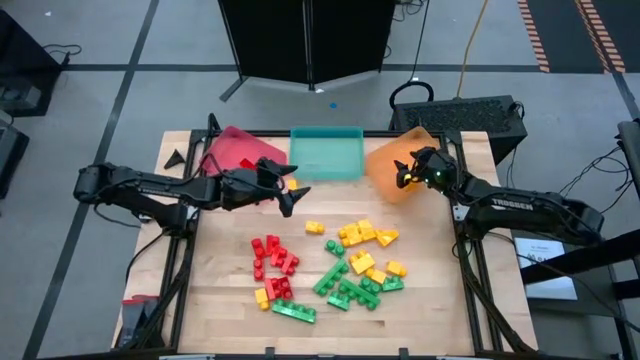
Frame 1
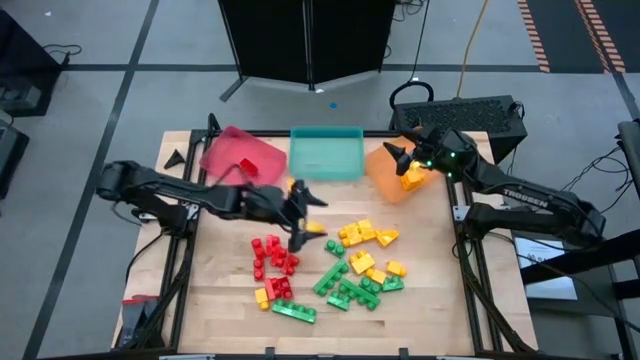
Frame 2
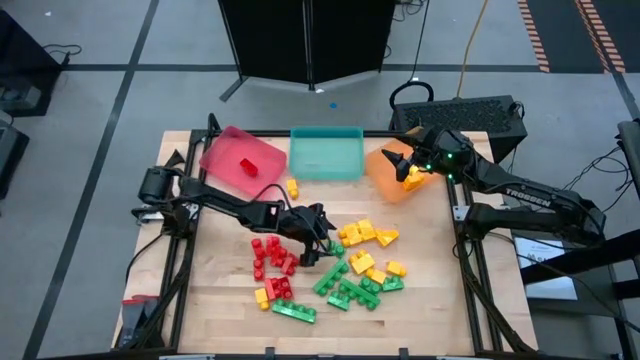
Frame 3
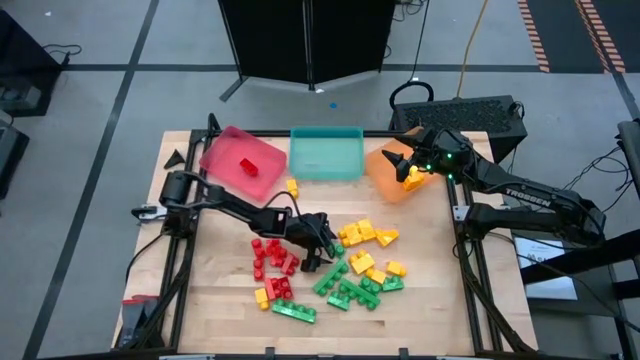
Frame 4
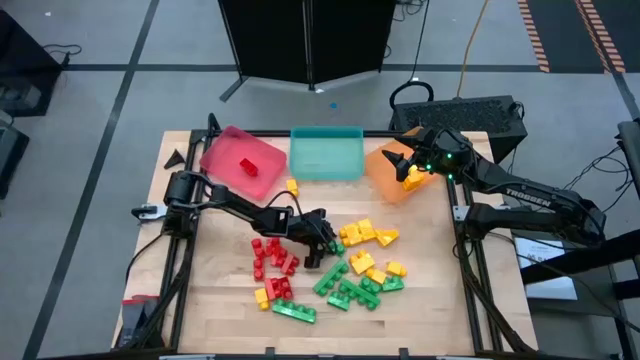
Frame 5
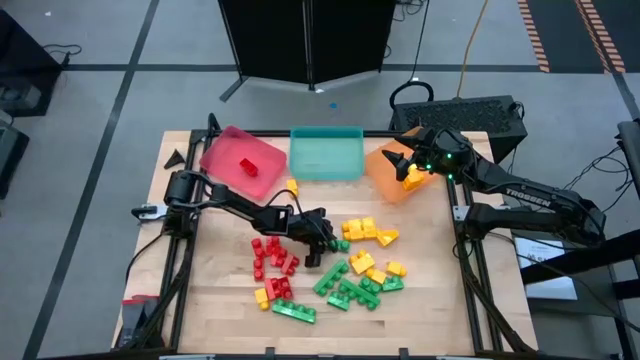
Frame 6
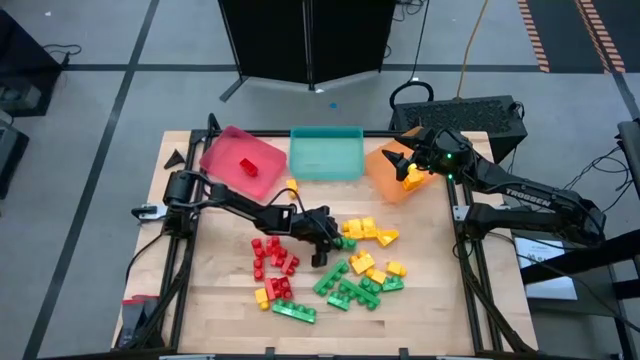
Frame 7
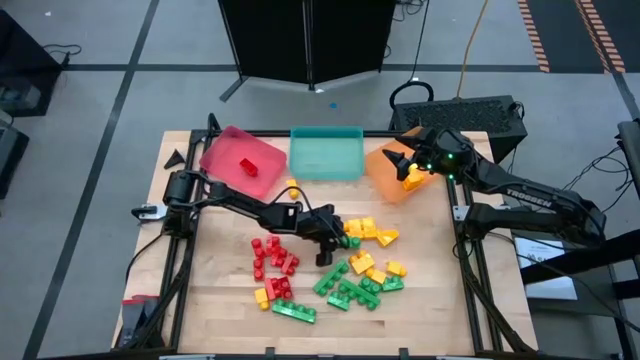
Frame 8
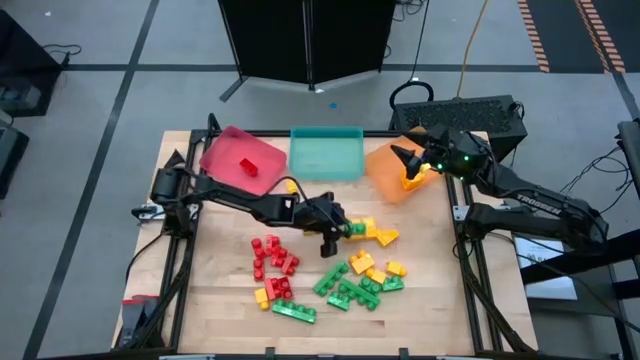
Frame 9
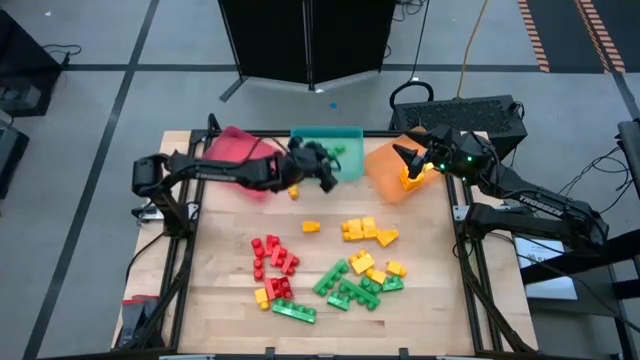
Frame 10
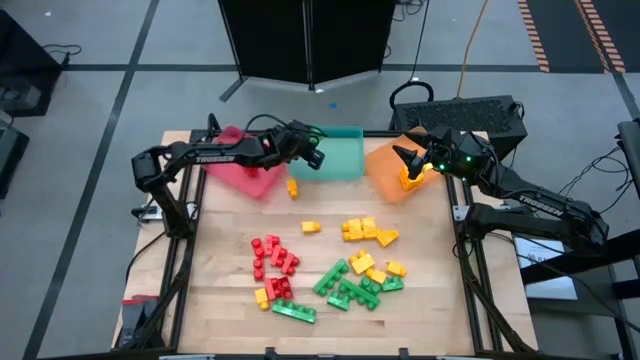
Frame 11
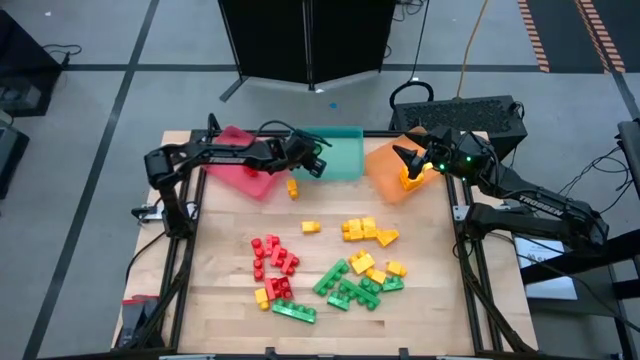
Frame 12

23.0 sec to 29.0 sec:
Task: Sort blocks
Put the green game piece into the blue bin

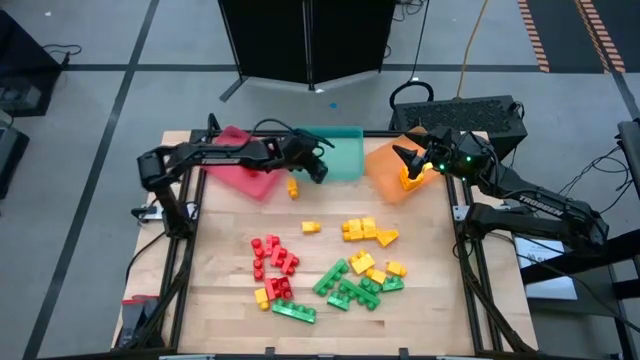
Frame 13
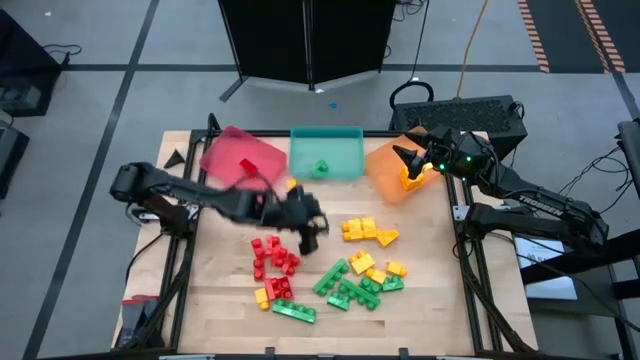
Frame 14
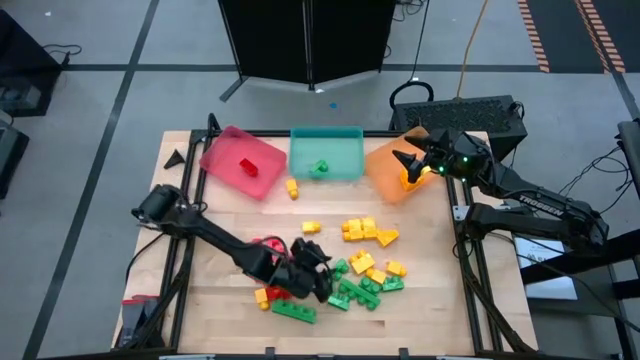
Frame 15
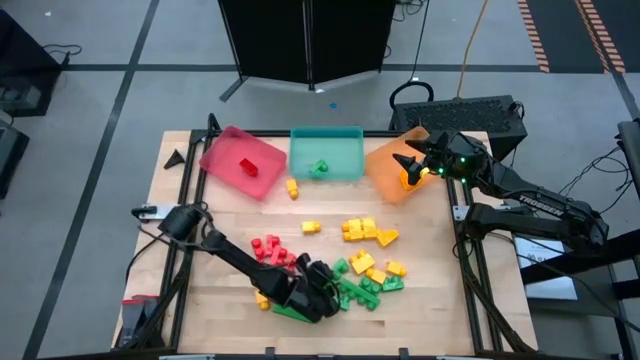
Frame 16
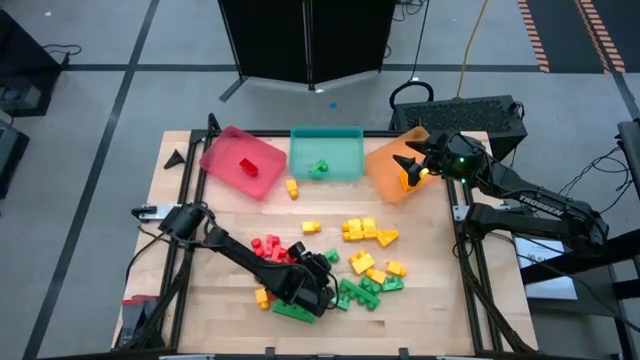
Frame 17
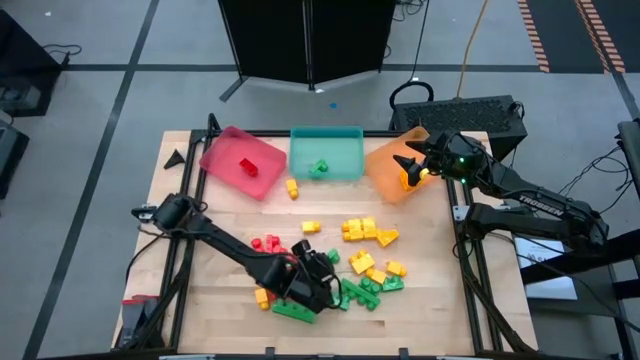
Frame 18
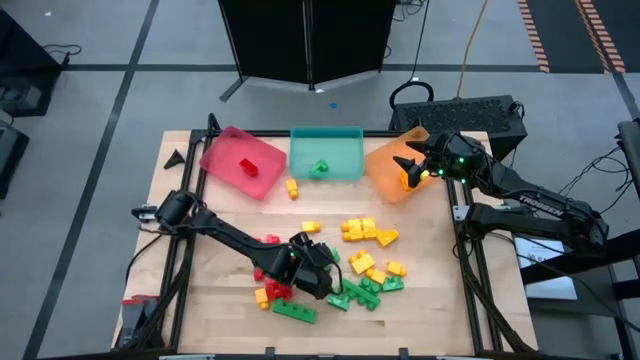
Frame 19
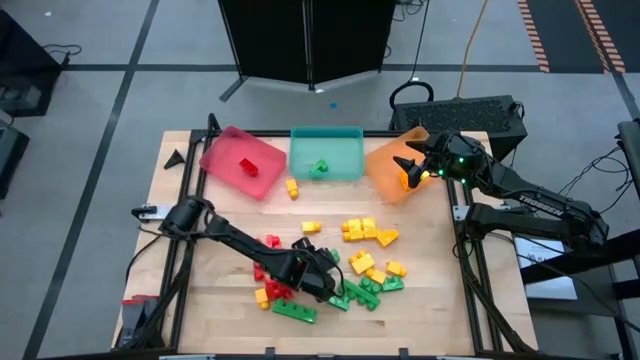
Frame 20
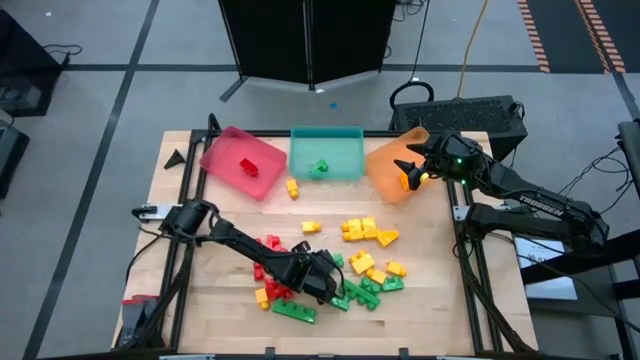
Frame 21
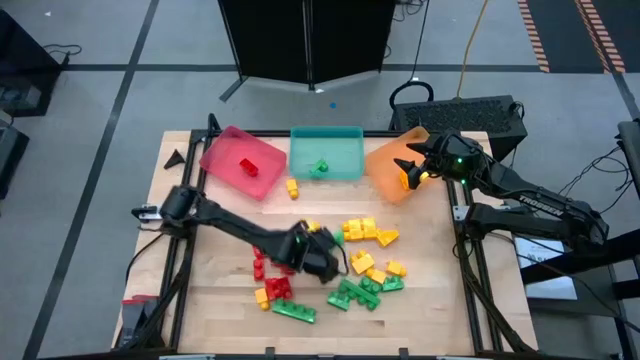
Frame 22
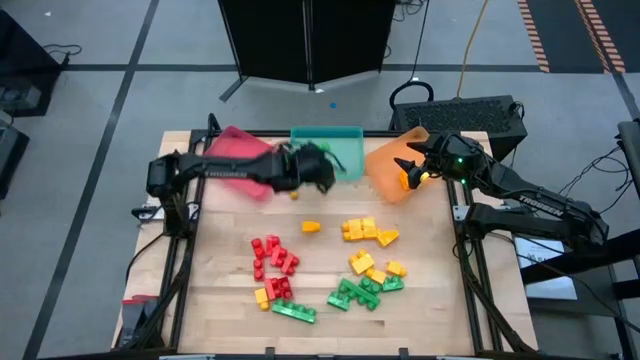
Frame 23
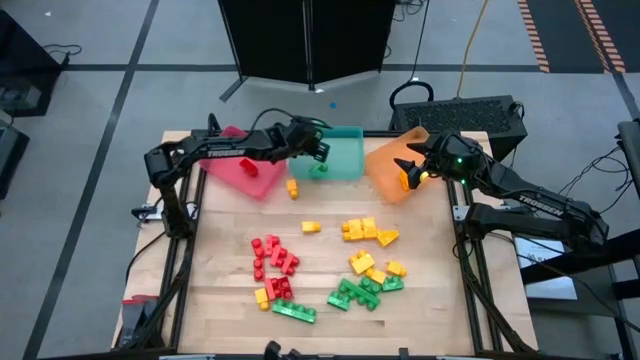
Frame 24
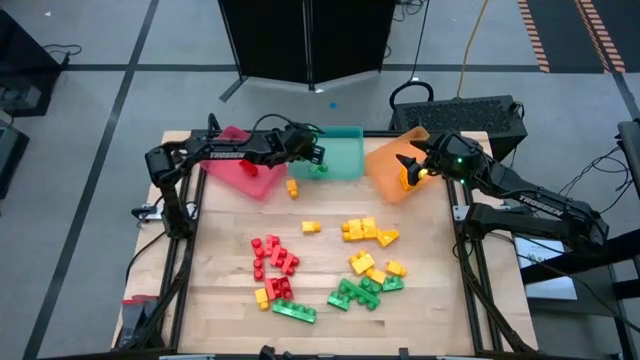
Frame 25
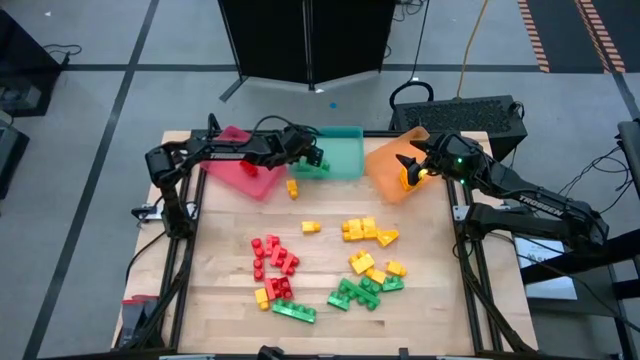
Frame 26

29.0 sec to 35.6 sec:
Put the green game piece into the blue bin

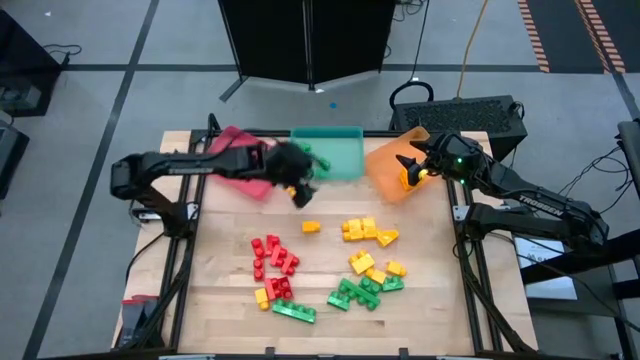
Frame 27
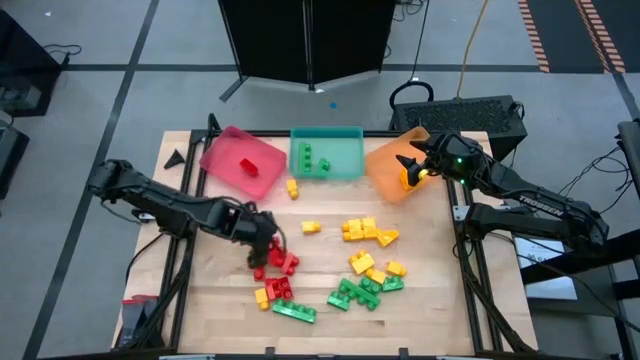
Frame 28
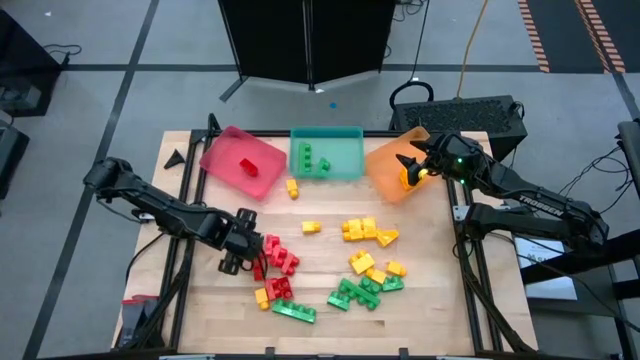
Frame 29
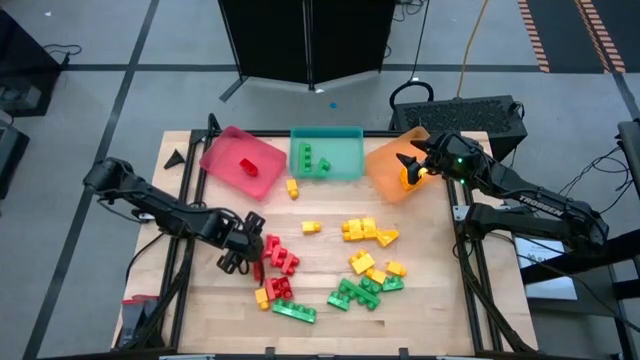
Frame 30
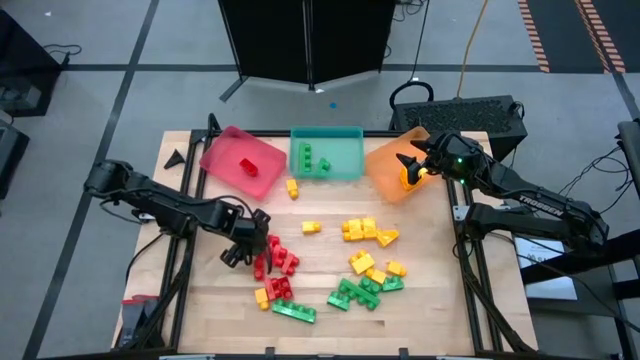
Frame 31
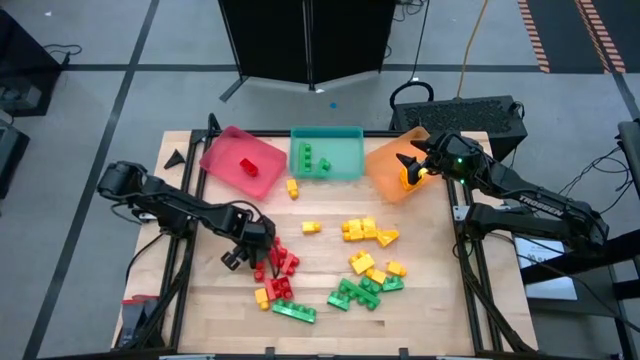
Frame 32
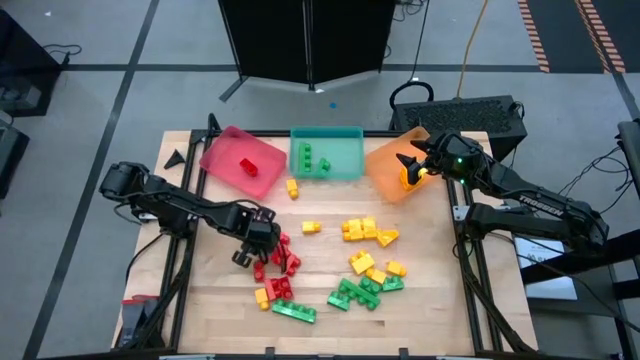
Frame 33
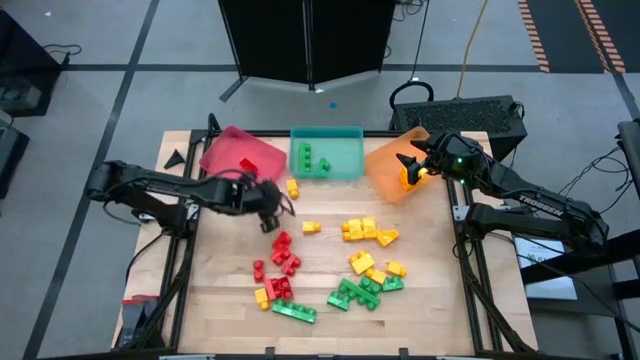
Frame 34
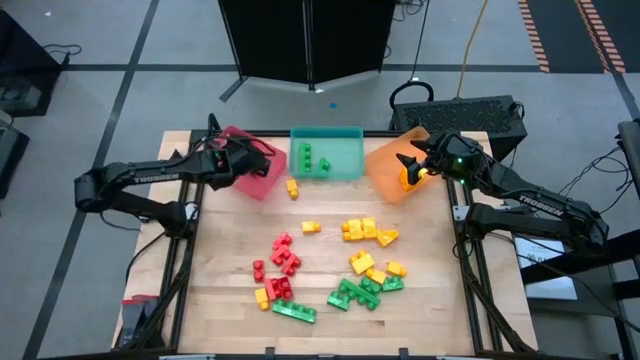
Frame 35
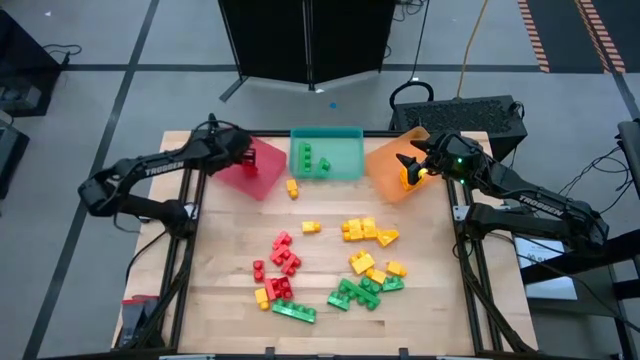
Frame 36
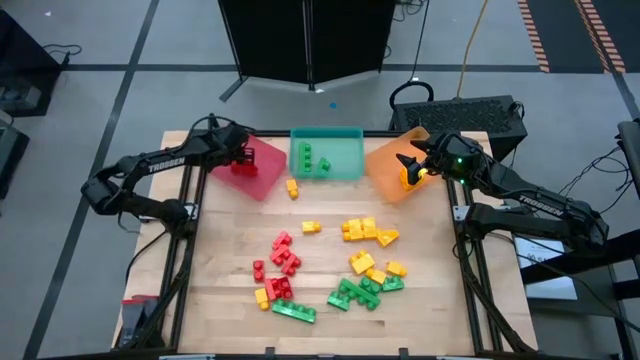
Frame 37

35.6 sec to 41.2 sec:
Put the red game piece into the red bin

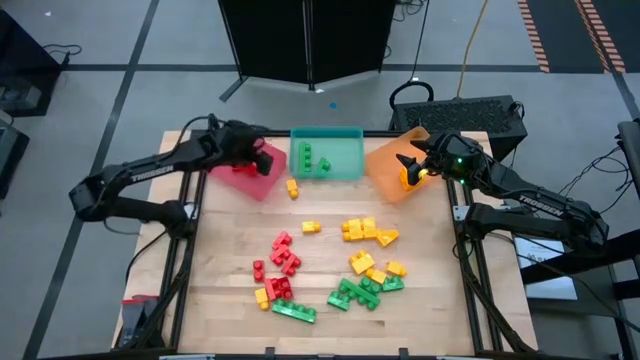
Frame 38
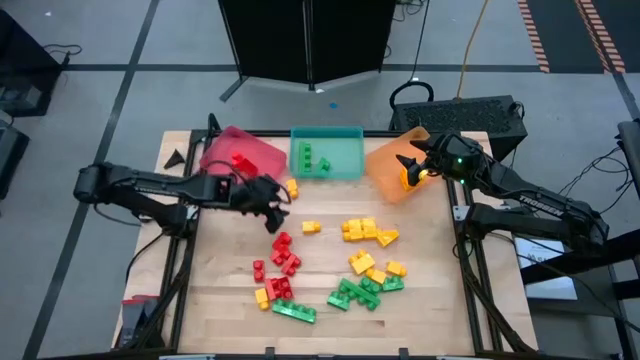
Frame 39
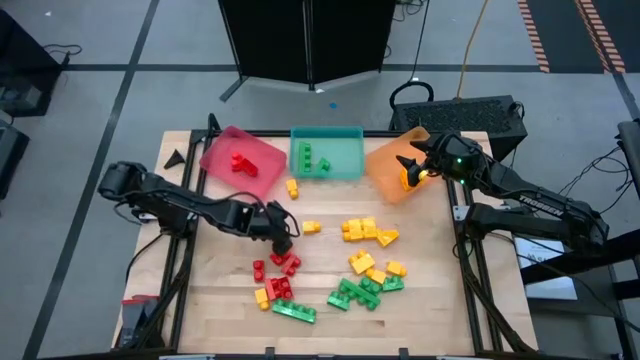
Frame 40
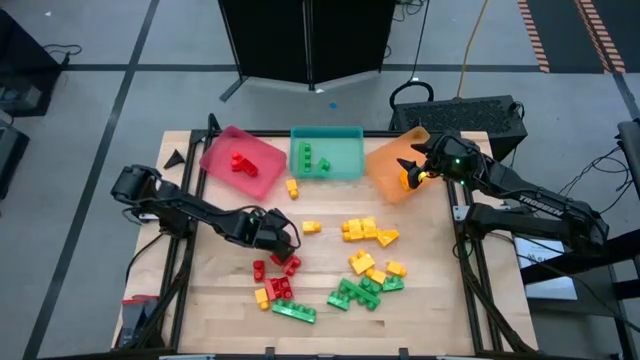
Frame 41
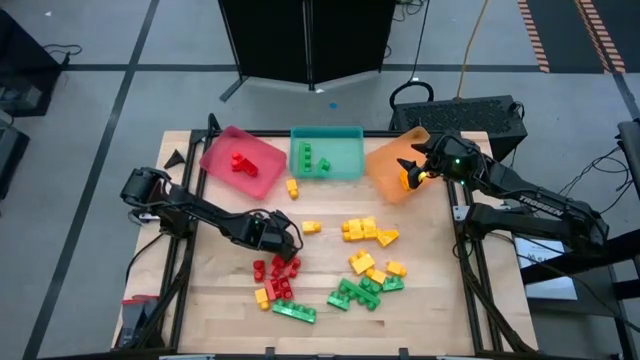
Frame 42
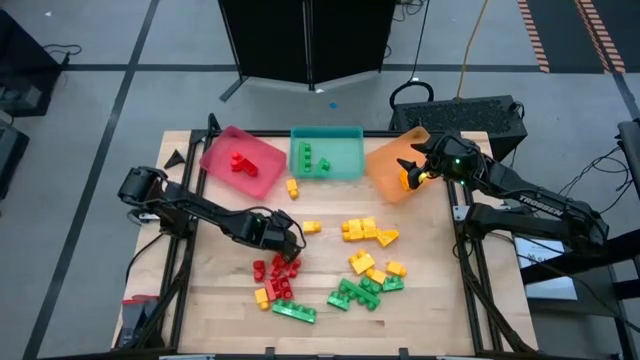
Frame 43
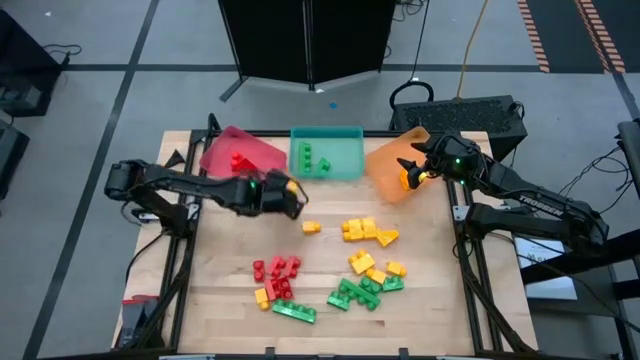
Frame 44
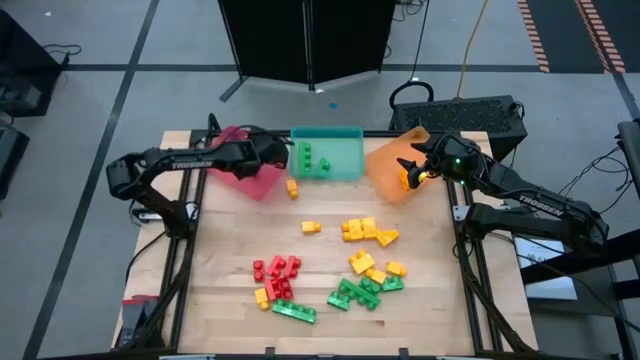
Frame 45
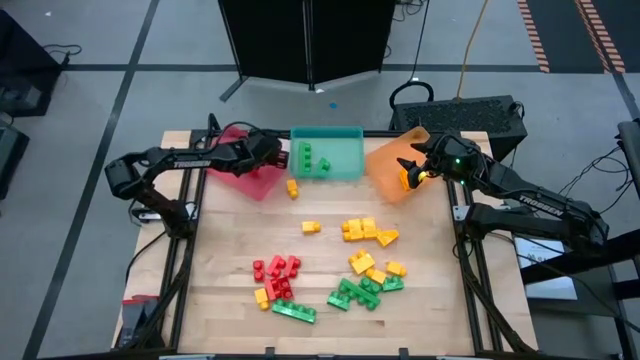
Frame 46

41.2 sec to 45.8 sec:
Put the red game piece into the red bin
